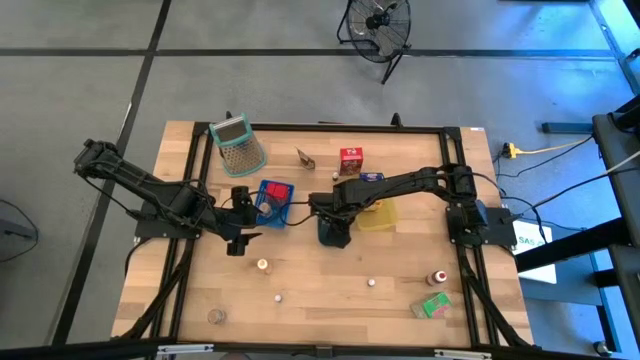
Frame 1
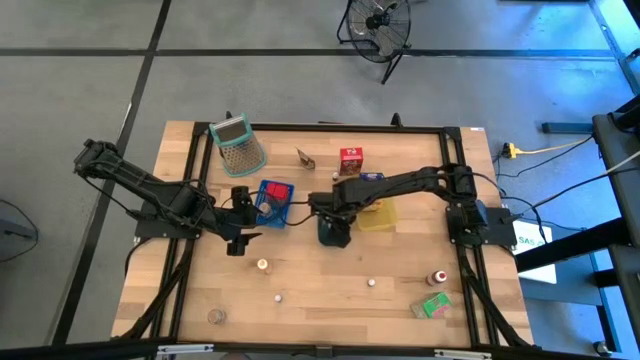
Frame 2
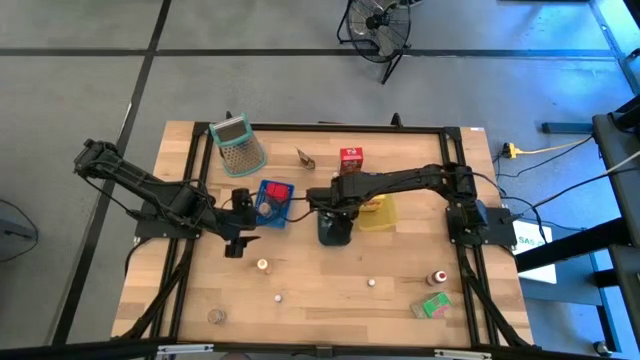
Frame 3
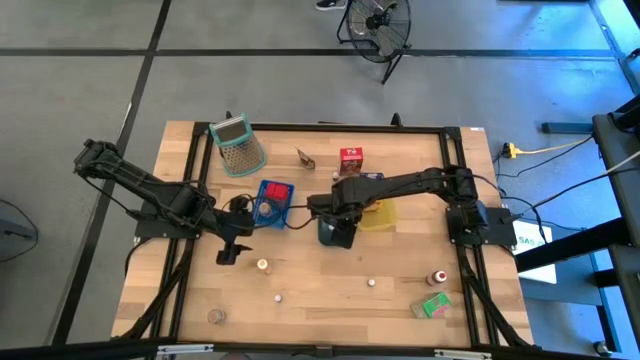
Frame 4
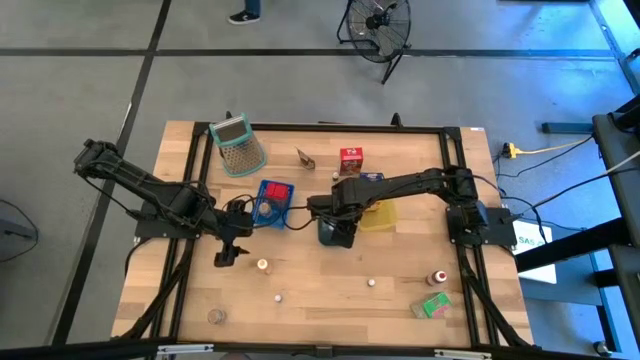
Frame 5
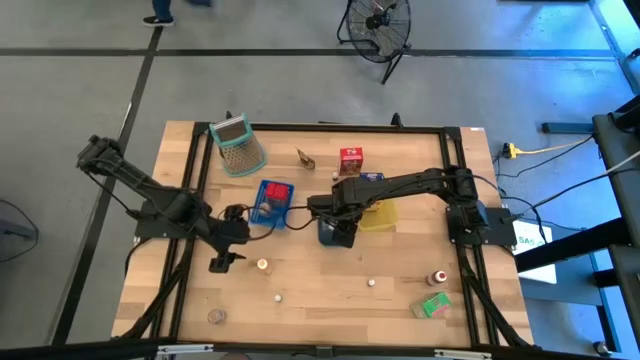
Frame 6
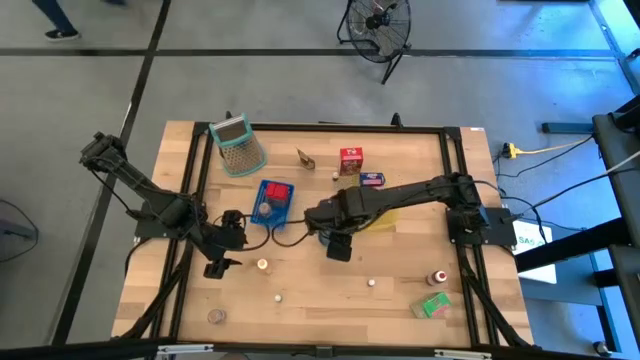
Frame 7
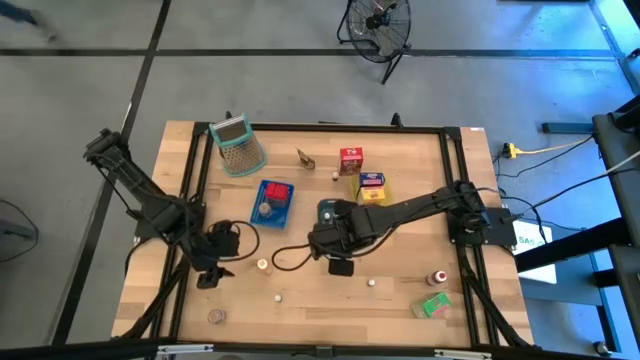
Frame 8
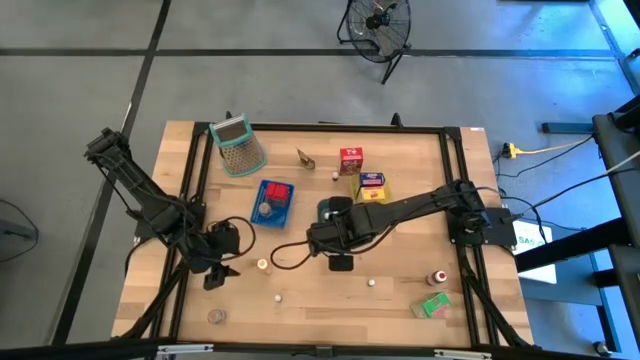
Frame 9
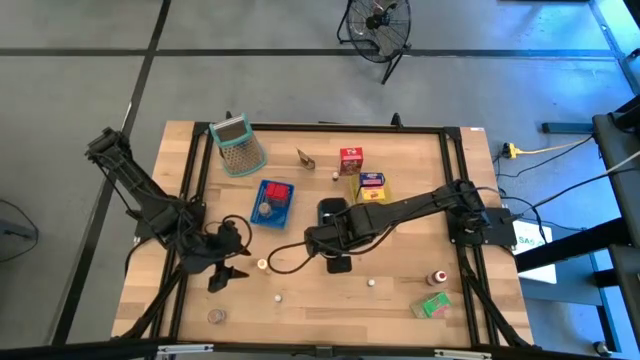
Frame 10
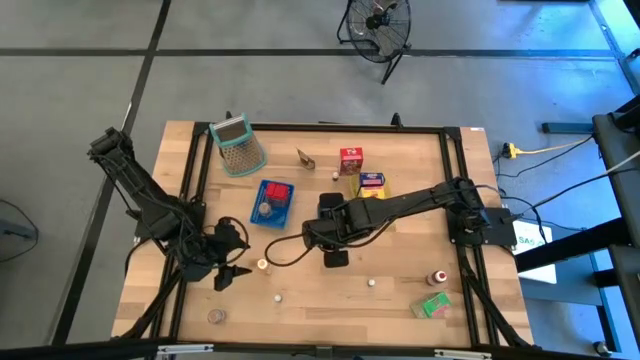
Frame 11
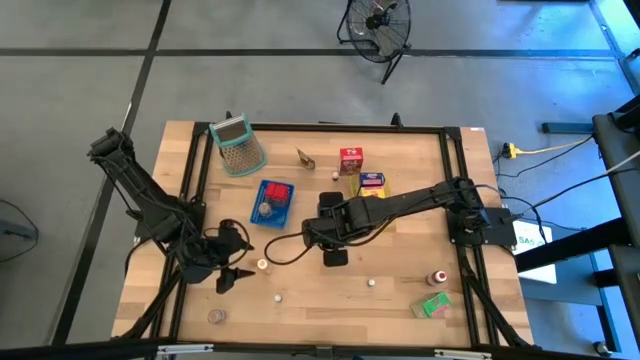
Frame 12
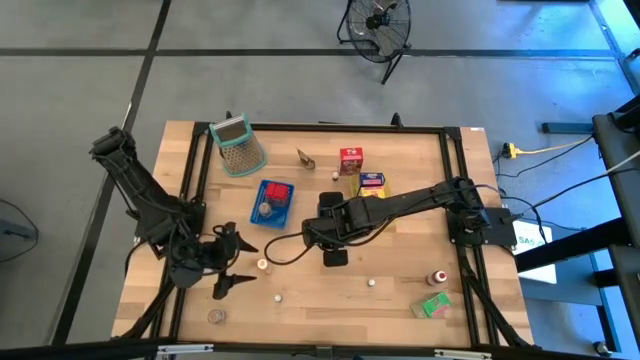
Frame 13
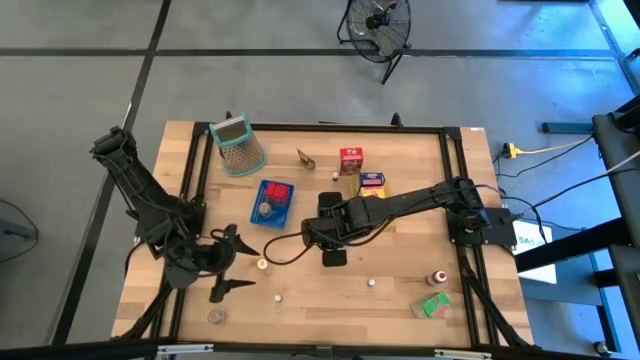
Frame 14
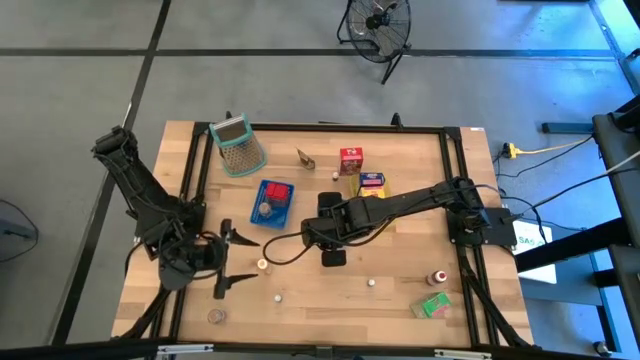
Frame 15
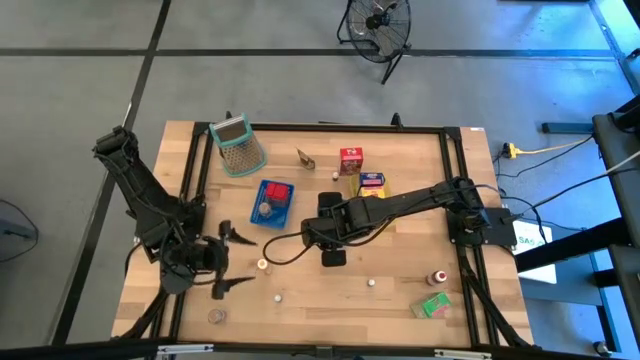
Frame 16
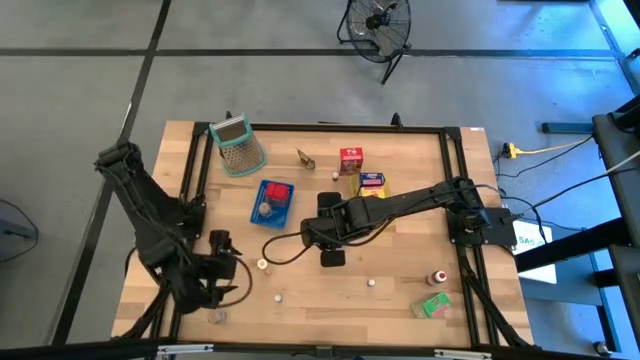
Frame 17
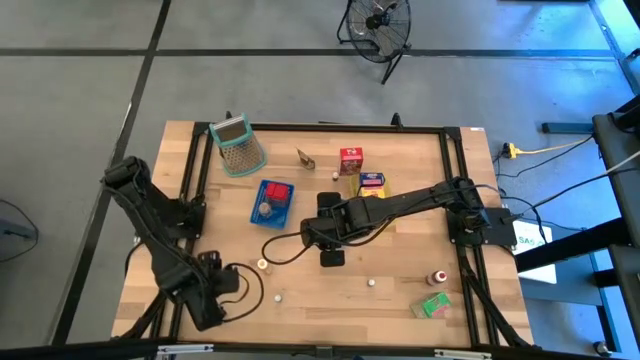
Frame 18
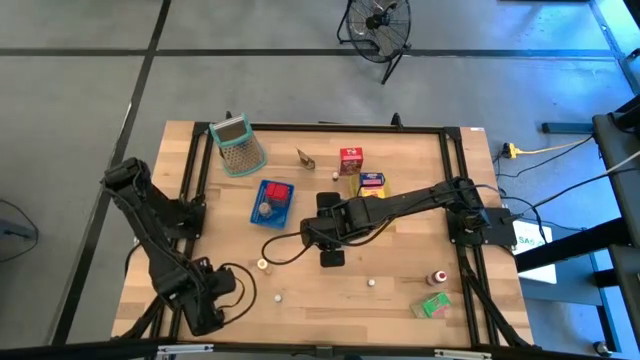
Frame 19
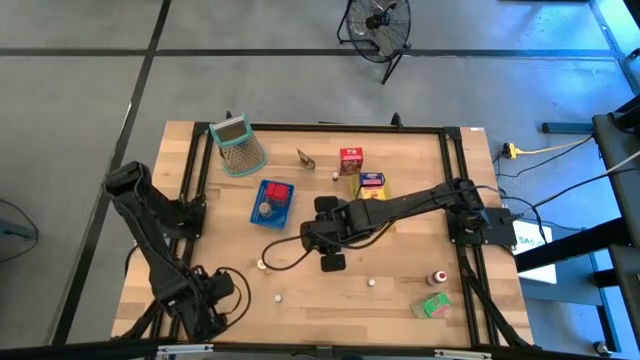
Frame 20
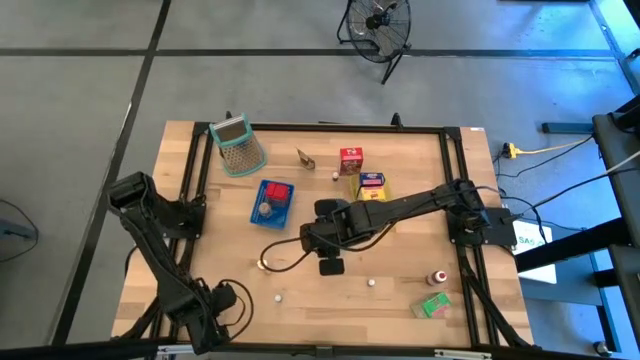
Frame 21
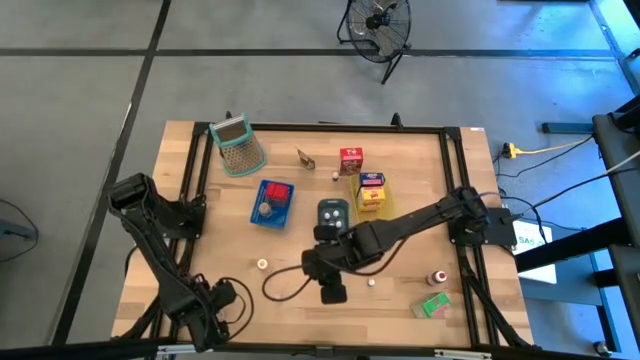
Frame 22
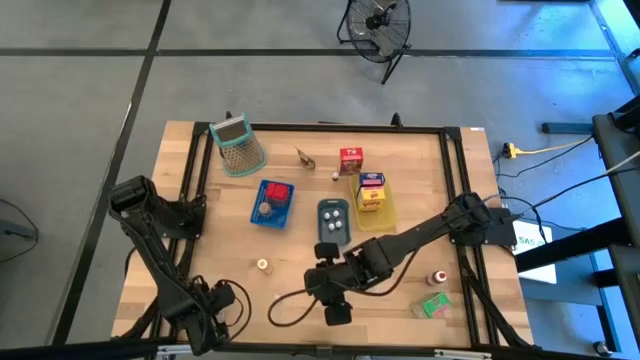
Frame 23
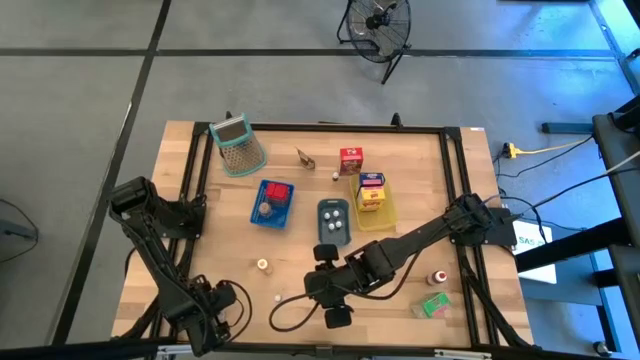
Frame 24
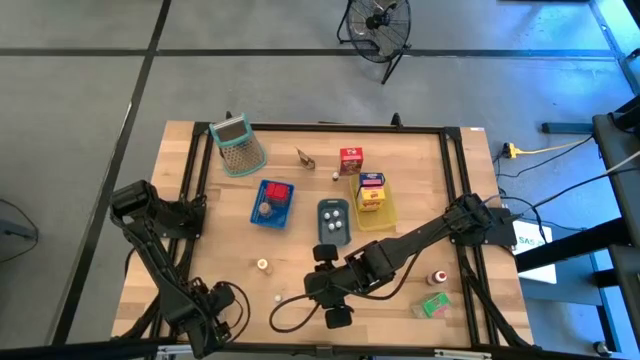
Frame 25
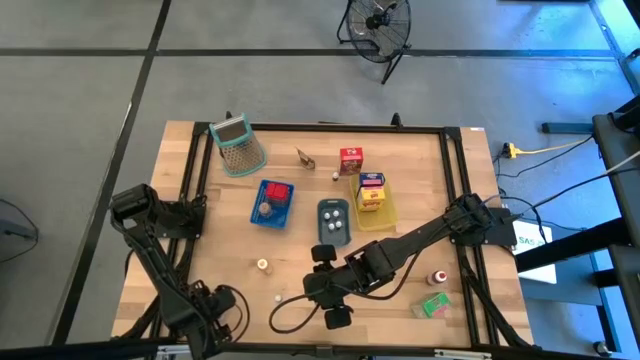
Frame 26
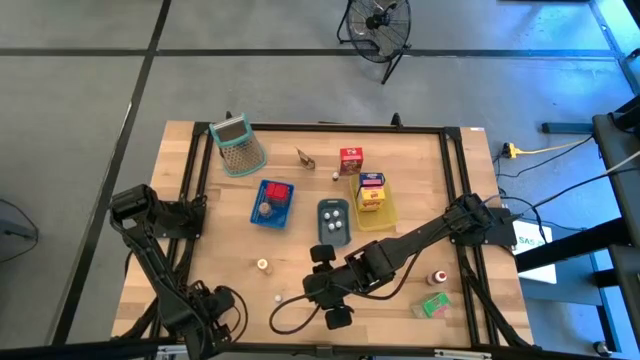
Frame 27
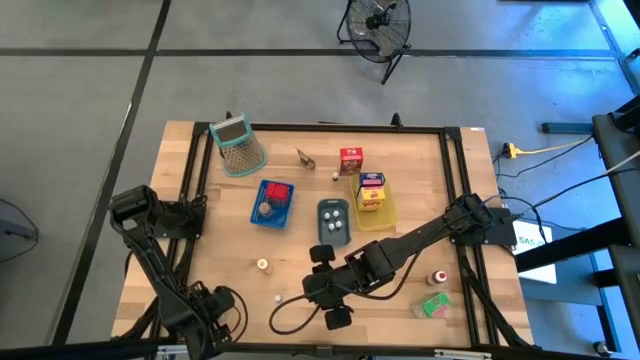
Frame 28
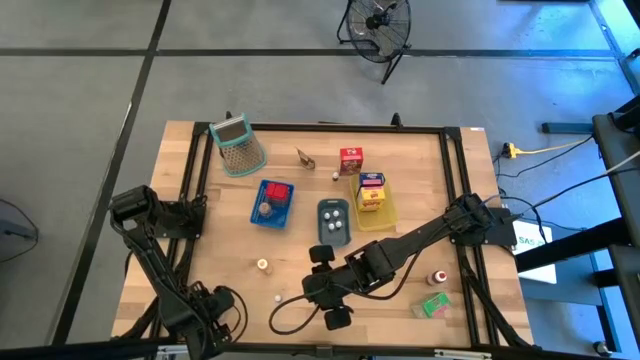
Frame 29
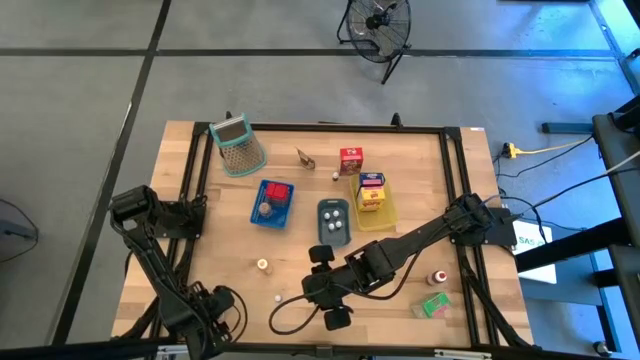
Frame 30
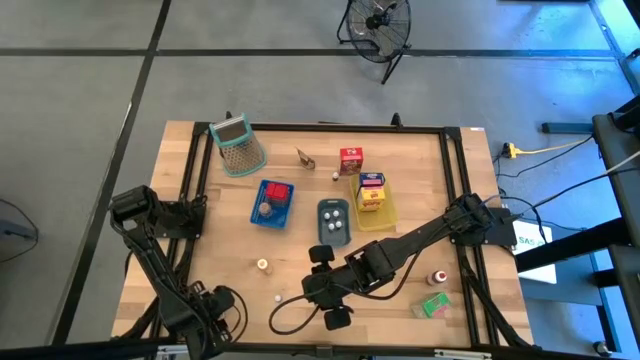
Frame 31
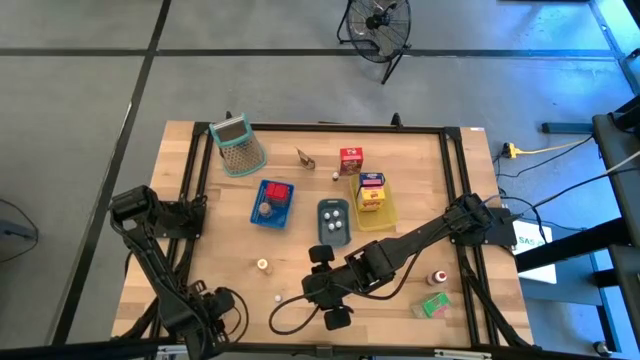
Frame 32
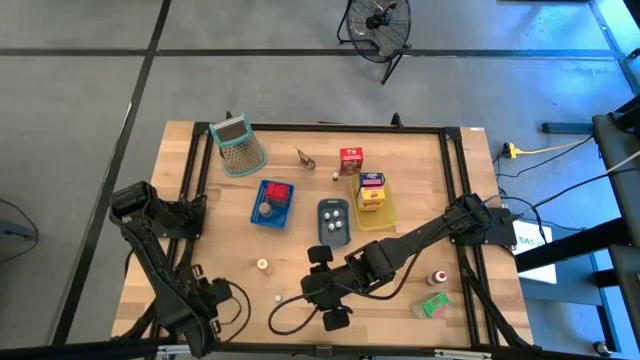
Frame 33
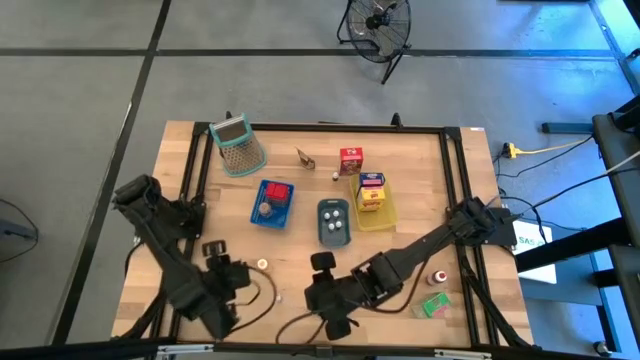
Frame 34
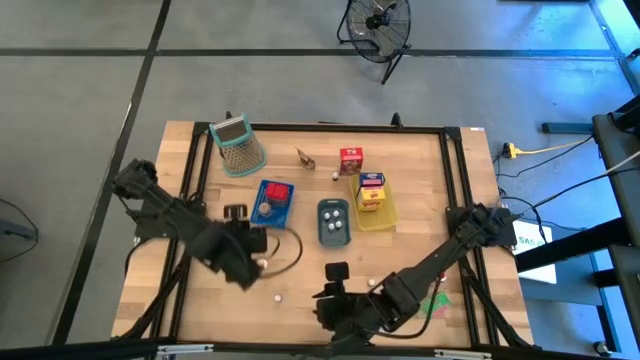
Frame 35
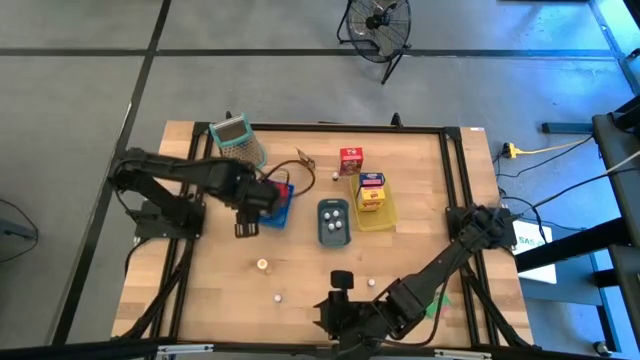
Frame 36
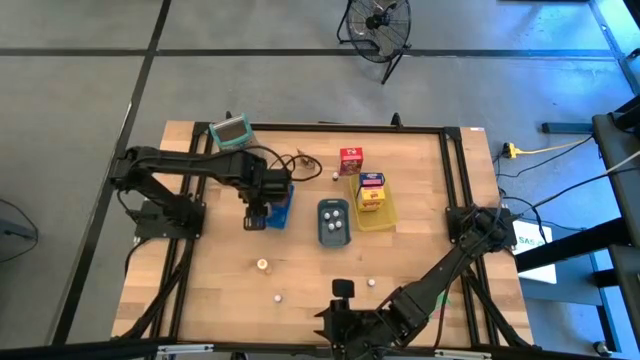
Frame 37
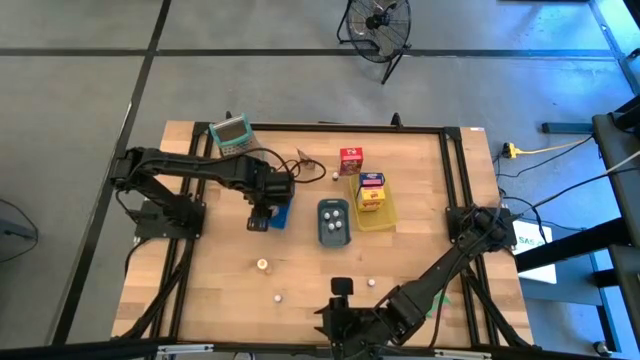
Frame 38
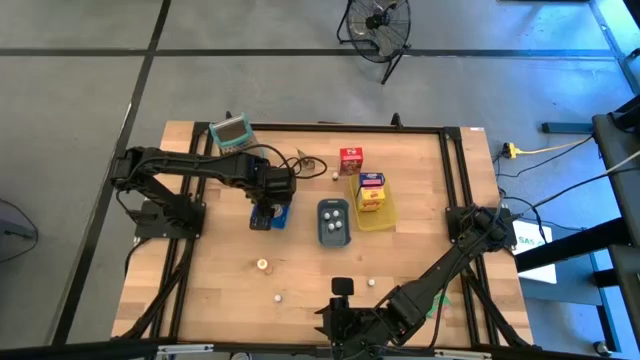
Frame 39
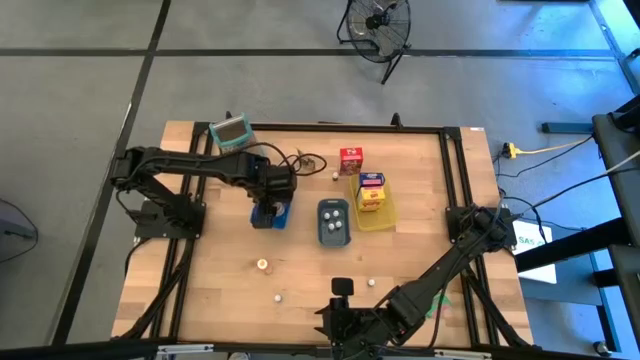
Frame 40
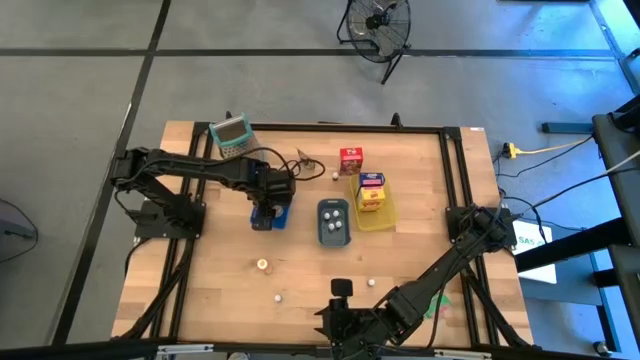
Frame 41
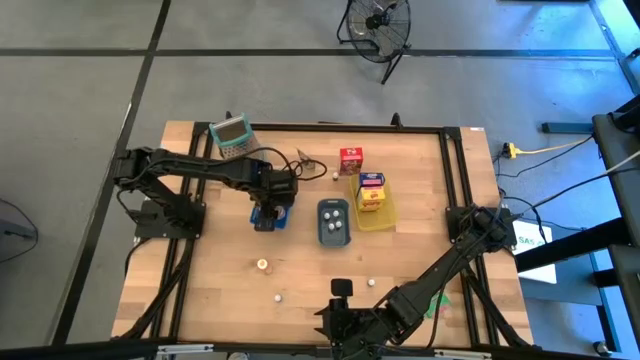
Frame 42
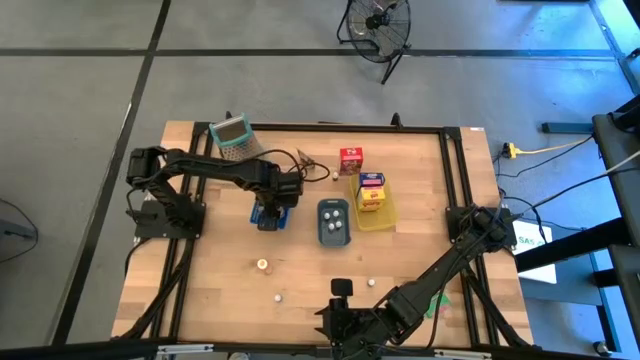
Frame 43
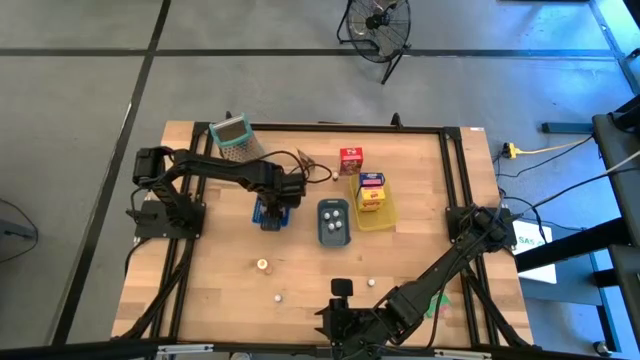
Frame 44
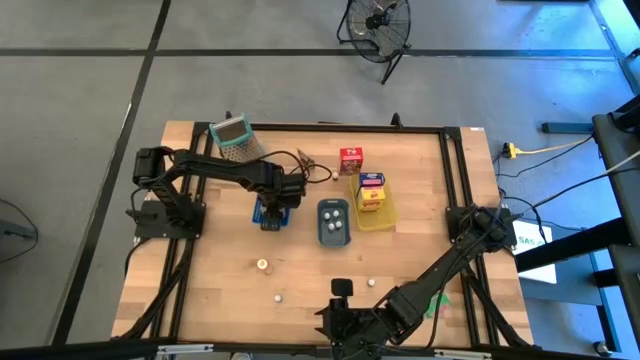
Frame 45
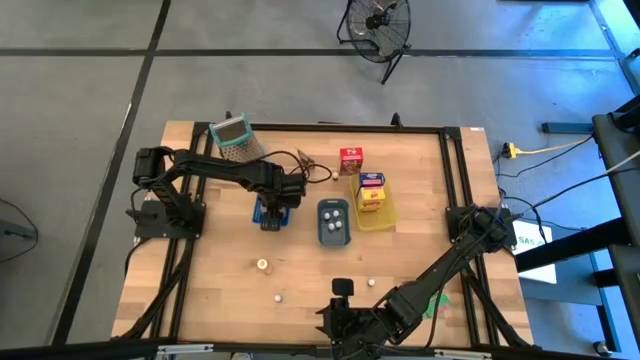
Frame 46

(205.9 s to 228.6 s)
Task: Pick & Place Kitchen Items
Put the brown seasoning bottle into the blue bin
